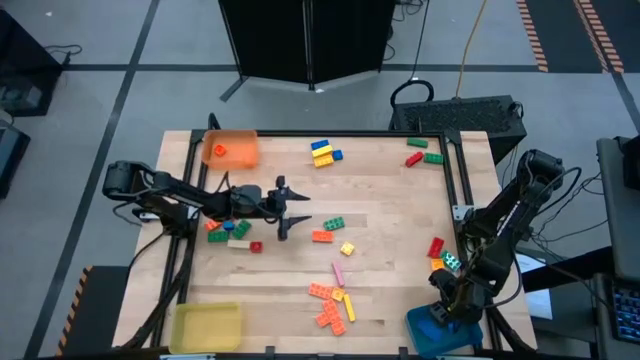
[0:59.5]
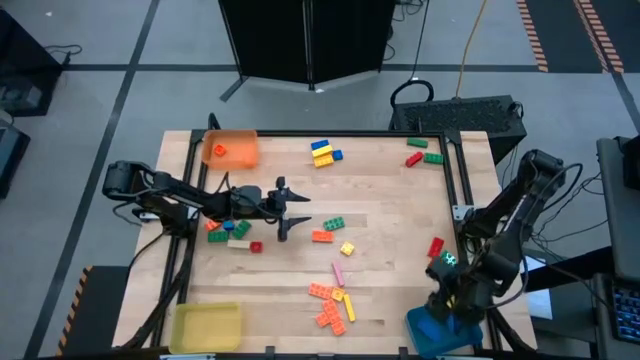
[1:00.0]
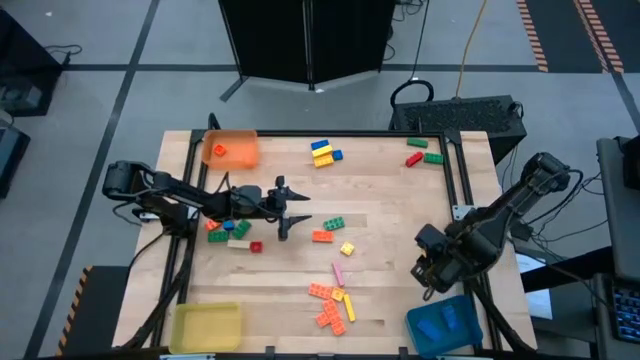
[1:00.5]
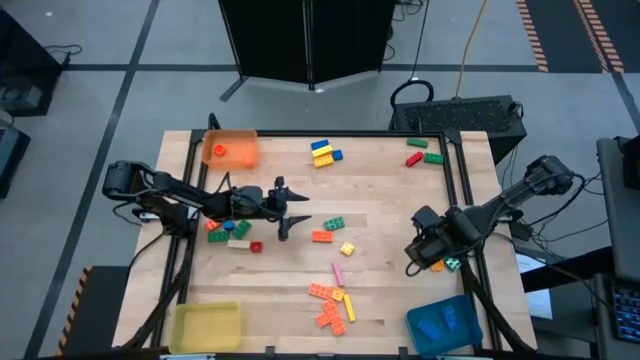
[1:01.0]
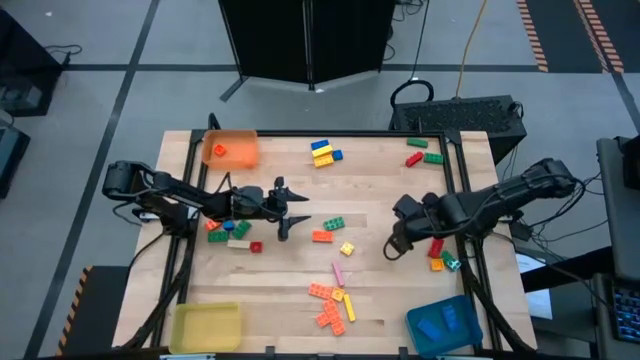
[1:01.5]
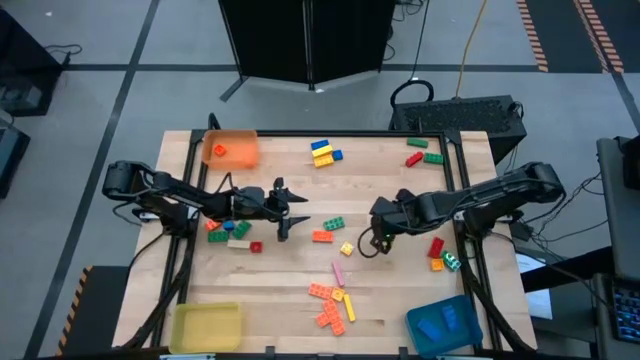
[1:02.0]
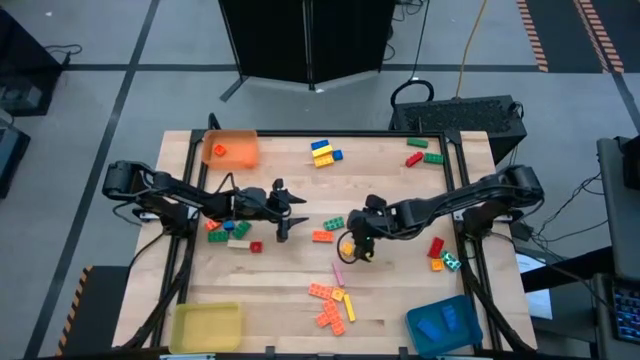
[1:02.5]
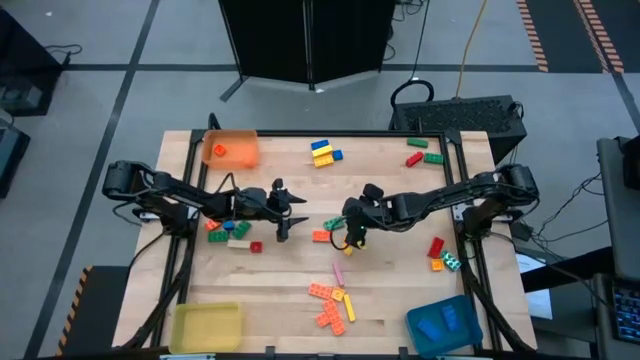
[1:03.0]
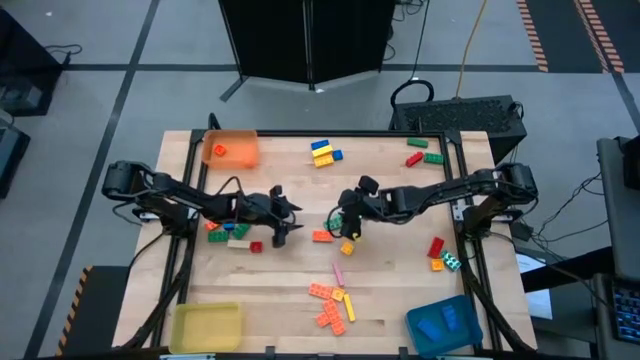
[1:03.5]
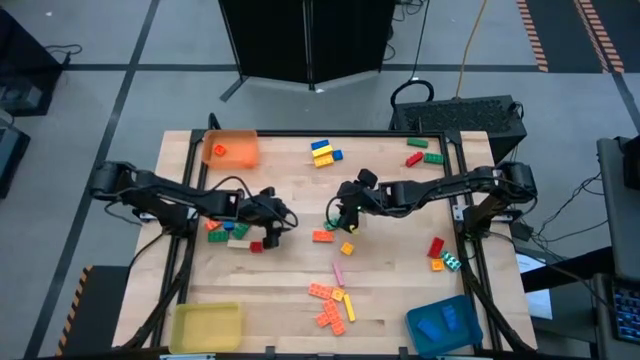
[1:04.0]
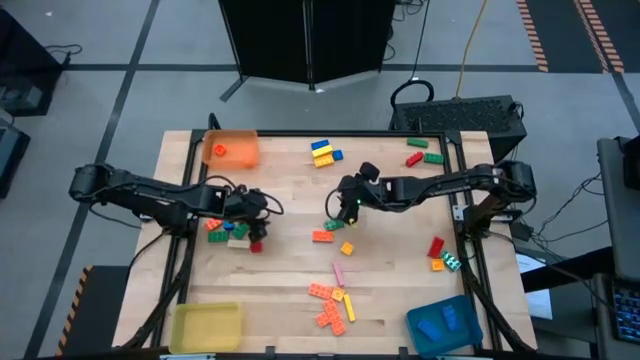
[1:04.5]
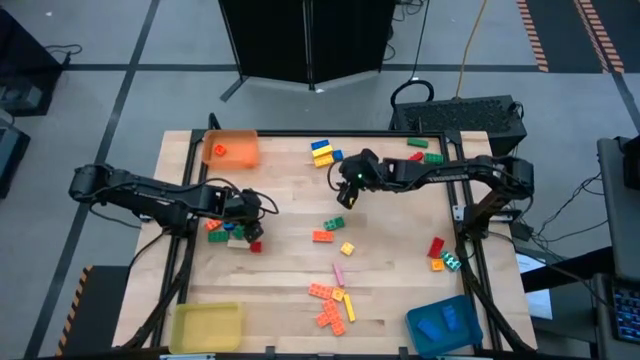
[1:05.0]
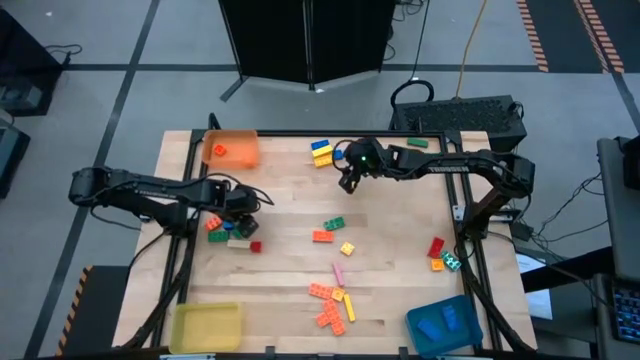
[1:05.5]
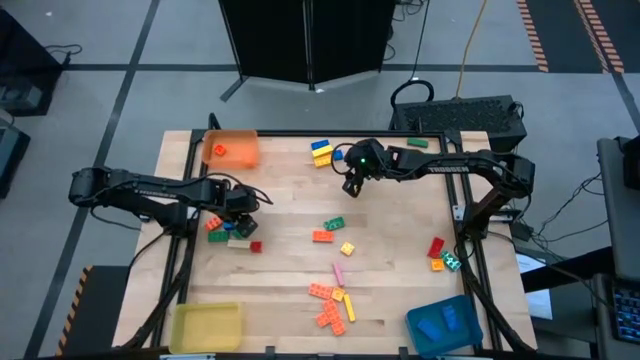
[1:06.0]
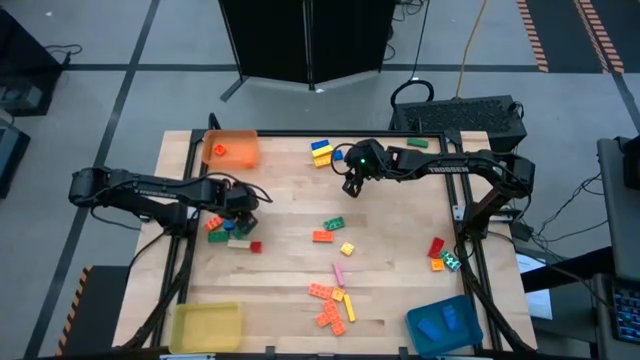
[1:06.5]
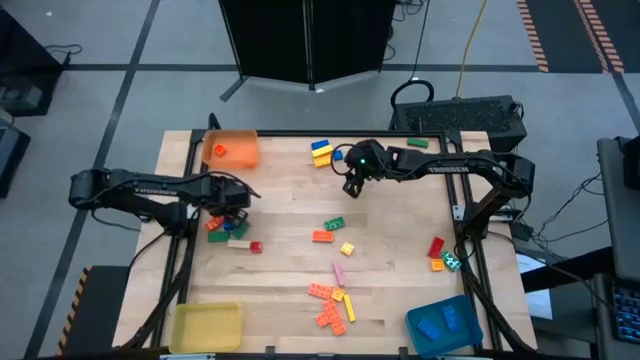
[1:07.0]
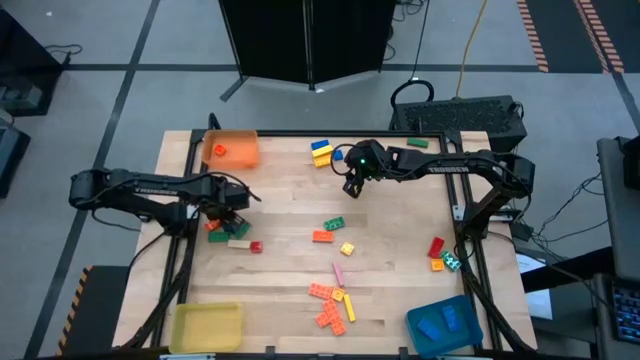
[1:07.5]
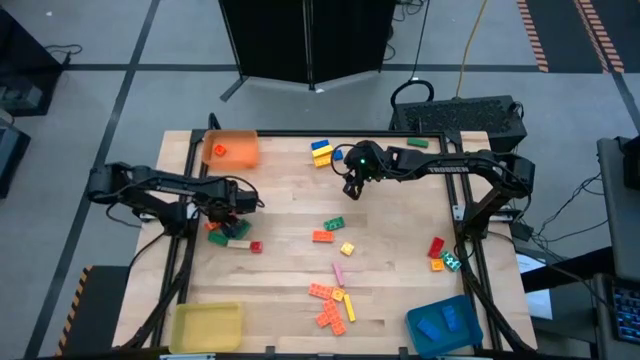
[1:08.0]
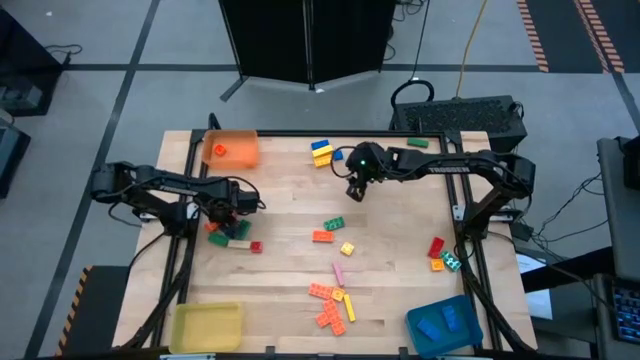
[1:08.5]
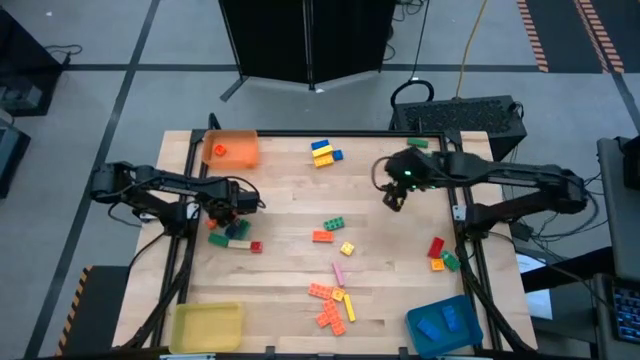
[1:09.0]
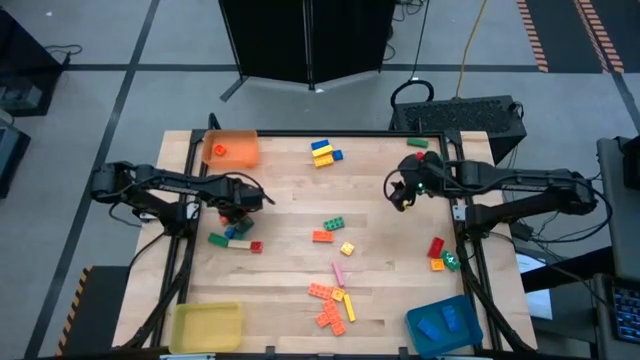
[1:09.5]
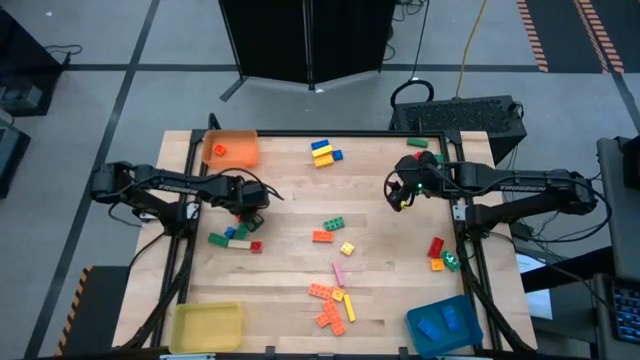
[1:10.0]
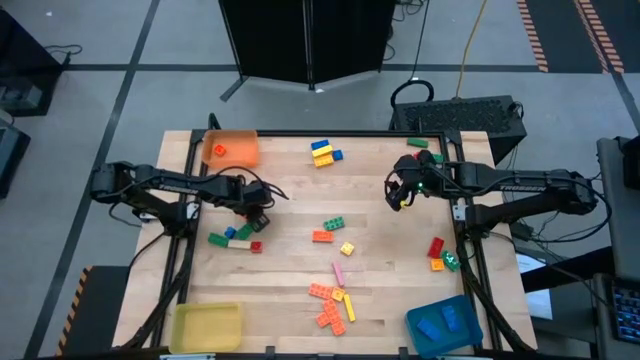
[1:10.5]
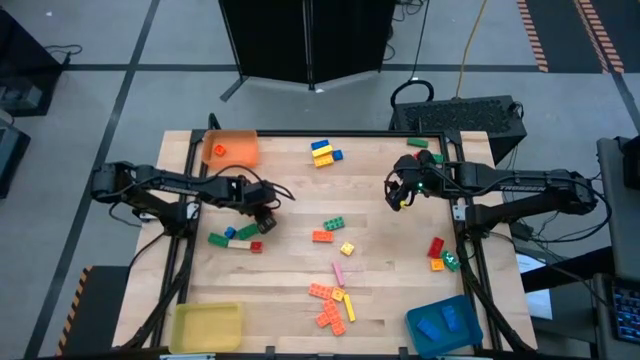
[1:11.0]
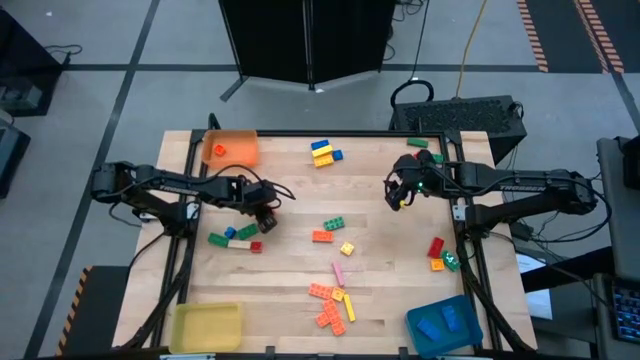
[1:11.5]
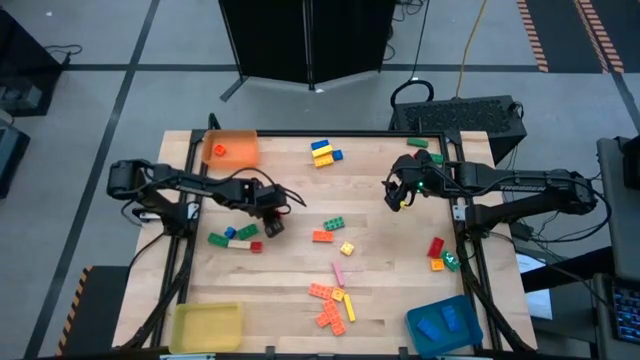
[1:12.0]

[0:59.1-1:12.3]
Task: Sort blocks by size
Put the orange 8 stud game piece into the blue bin

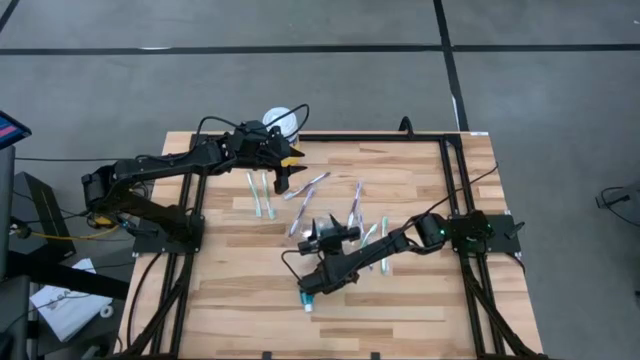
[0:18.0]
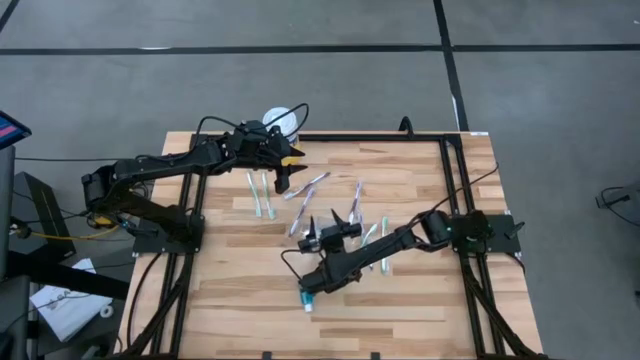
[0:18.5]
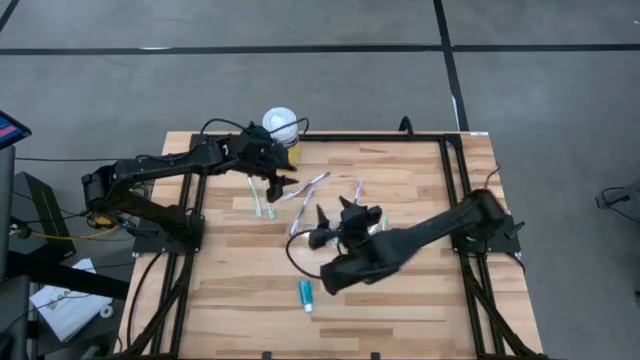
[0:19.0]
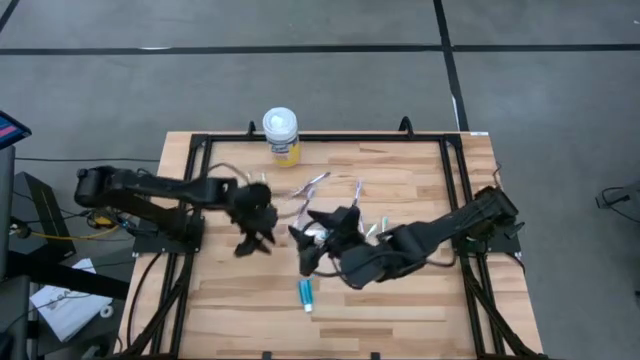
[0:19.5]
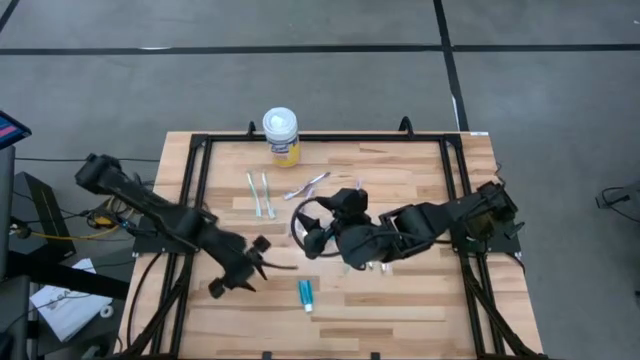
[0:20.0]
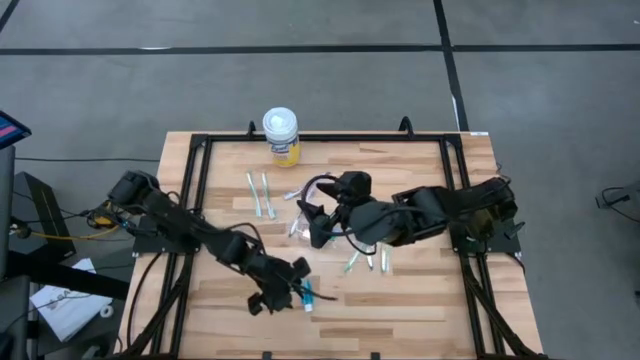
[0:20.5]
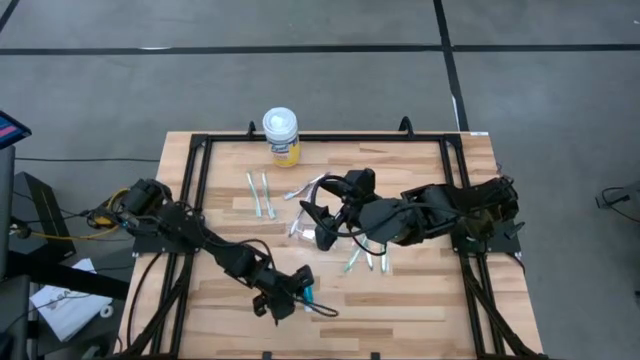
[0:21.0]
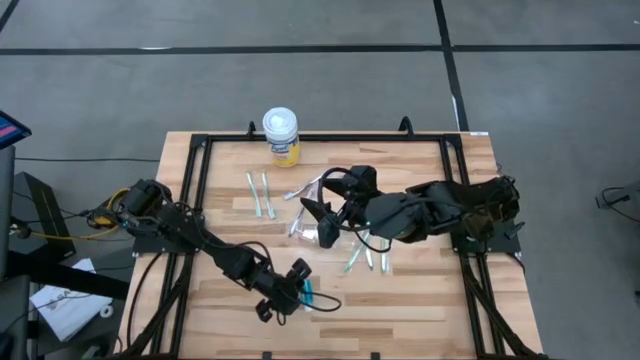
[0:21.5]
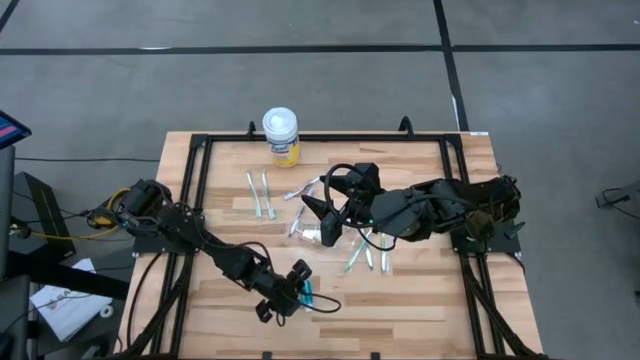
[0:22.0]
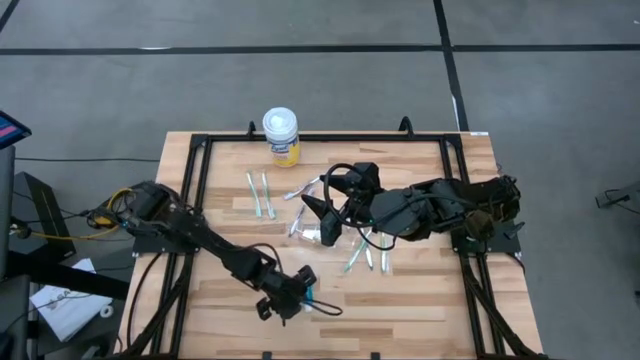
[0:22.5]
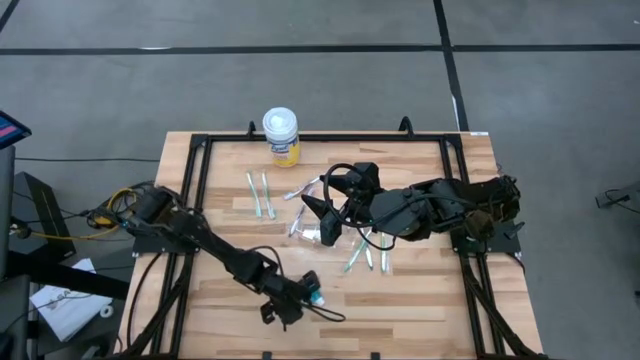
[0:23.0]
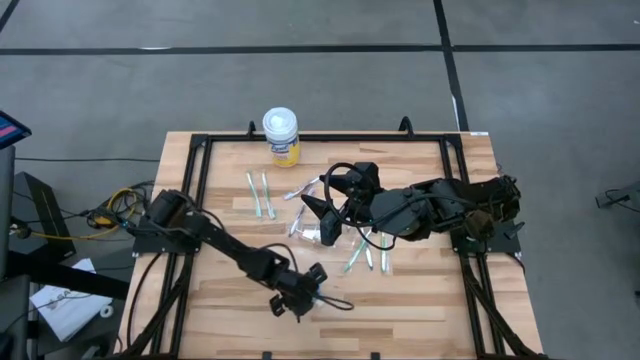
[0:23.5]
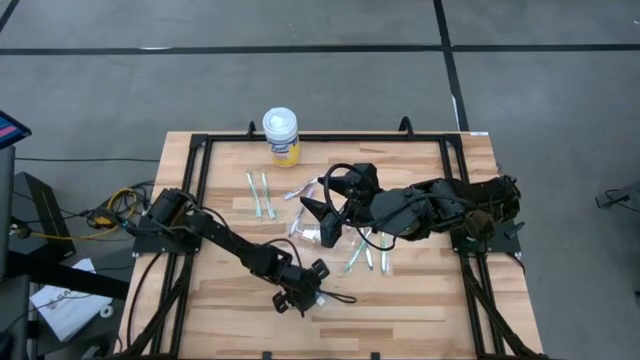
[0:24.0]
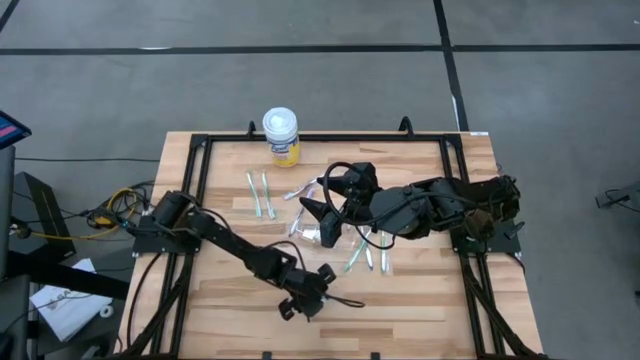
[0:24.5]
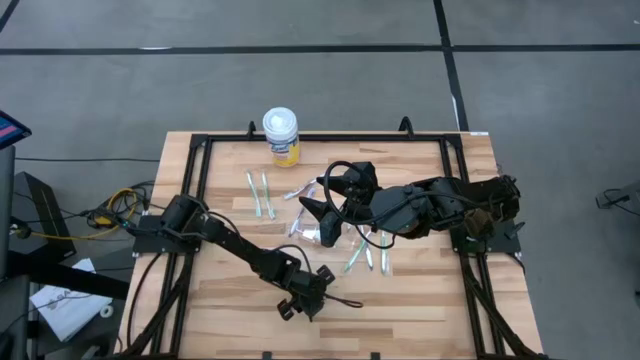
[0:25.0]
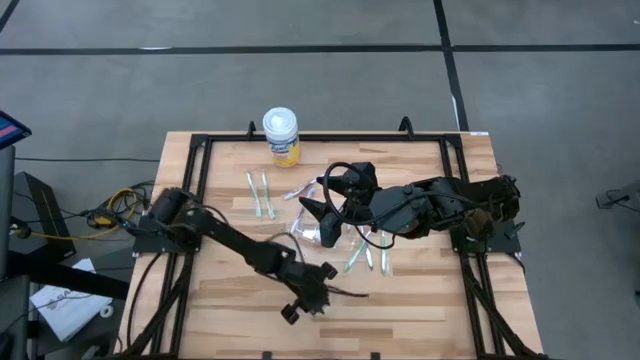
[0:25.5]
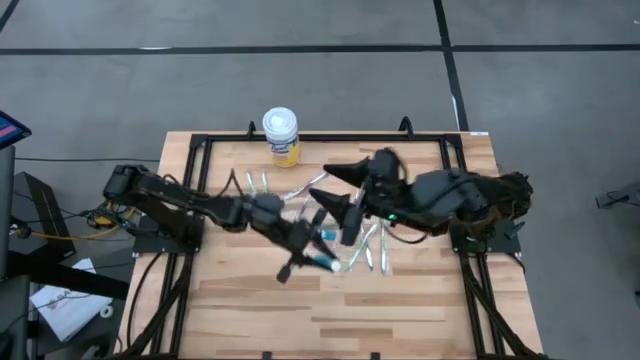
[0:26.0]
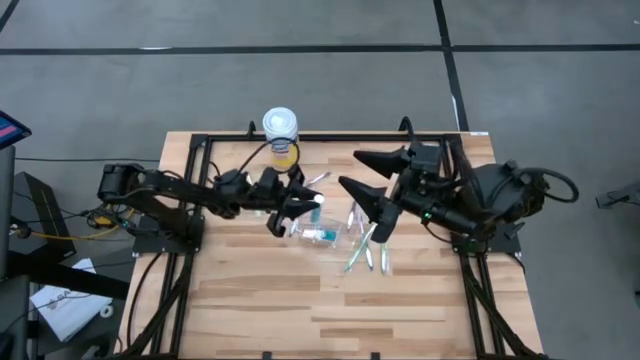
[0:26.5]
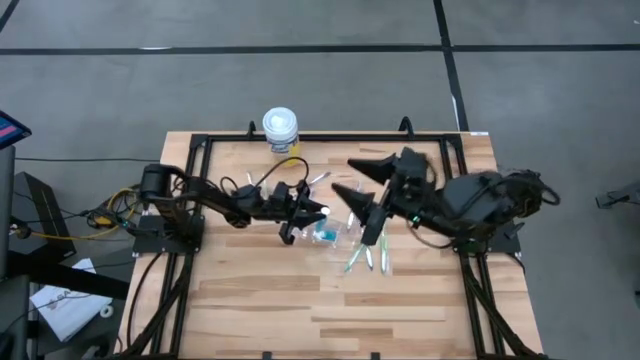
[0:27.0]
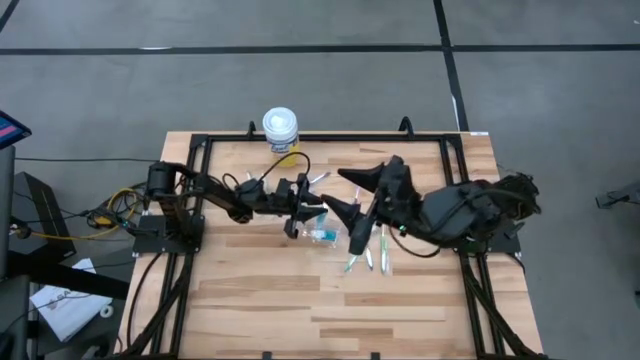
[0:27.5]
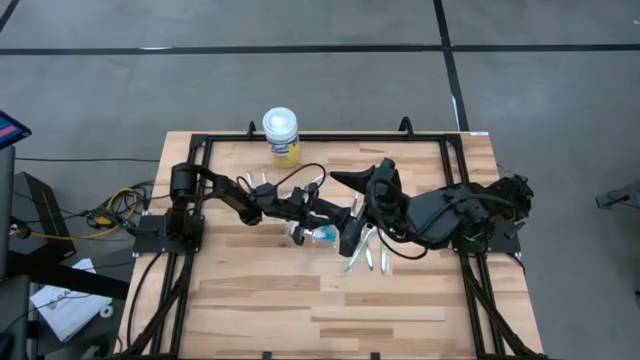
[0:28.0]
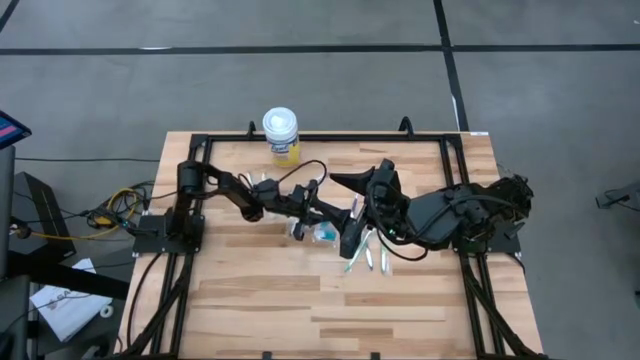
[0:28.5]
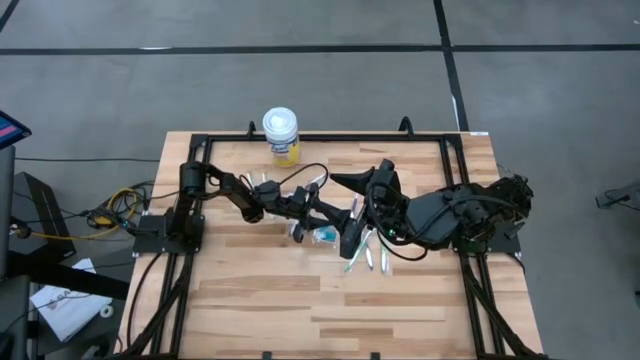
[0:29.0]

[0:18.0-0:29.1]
Task: Pick & Place toothbrushing station
Put the mouthwash into the middle compartment of the transparent organizer
